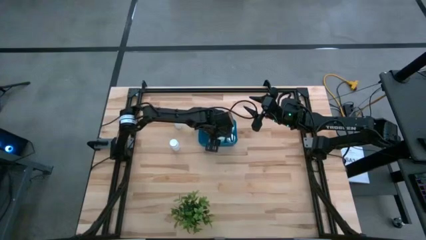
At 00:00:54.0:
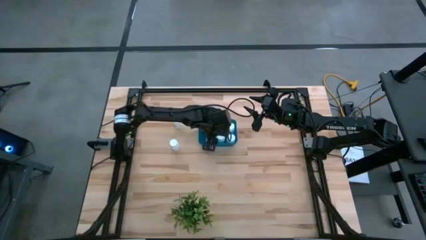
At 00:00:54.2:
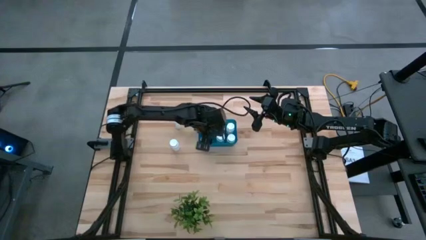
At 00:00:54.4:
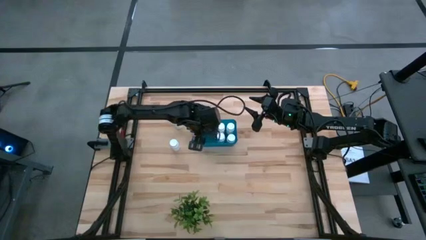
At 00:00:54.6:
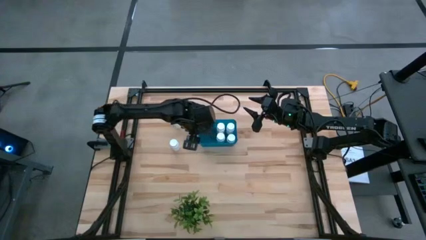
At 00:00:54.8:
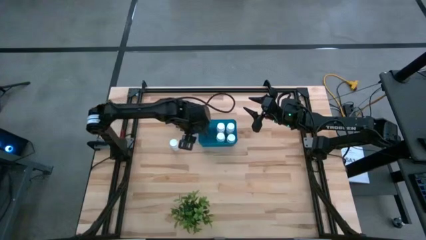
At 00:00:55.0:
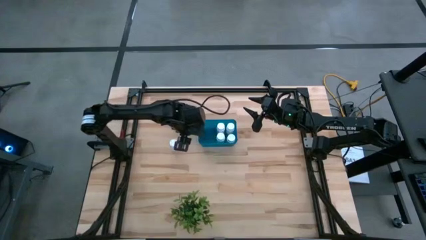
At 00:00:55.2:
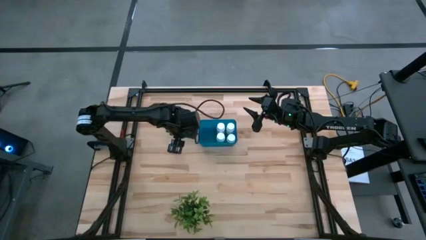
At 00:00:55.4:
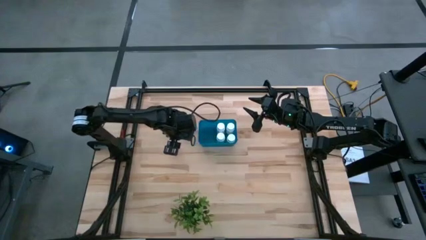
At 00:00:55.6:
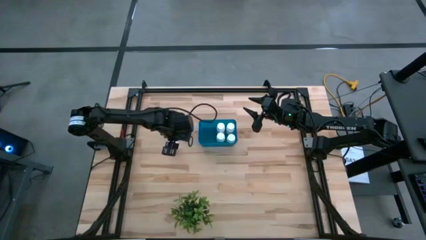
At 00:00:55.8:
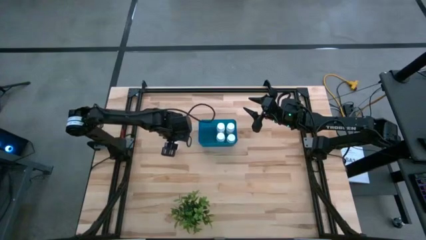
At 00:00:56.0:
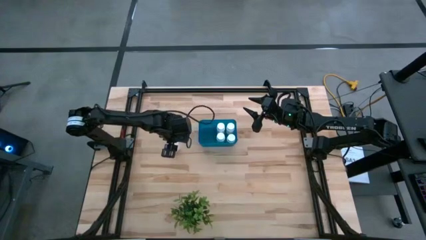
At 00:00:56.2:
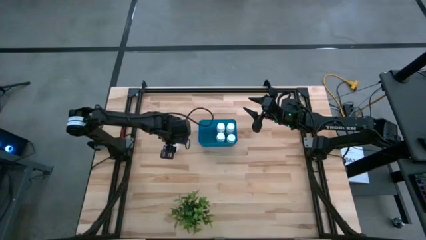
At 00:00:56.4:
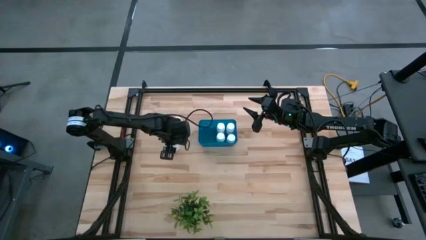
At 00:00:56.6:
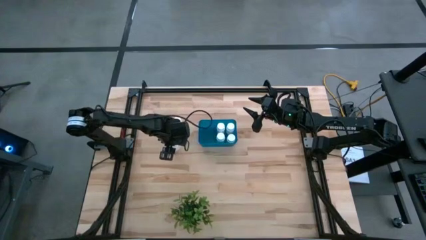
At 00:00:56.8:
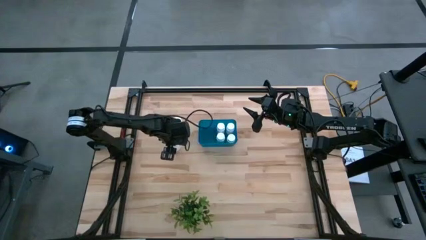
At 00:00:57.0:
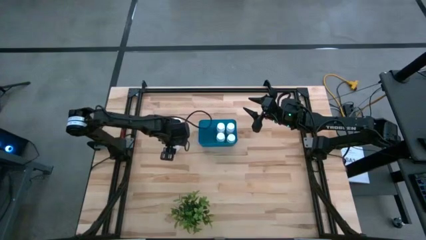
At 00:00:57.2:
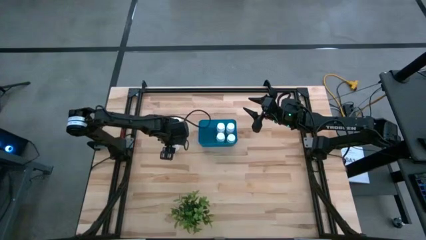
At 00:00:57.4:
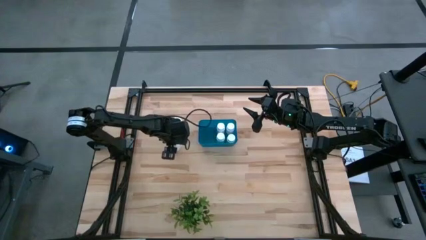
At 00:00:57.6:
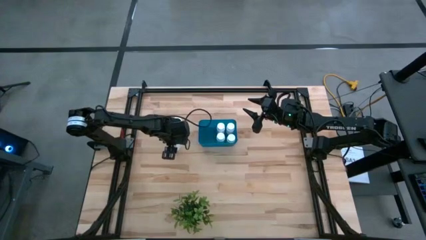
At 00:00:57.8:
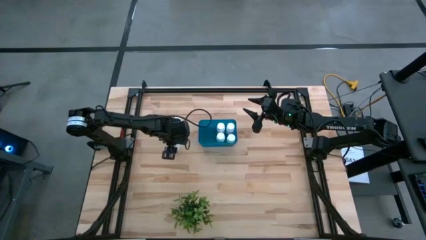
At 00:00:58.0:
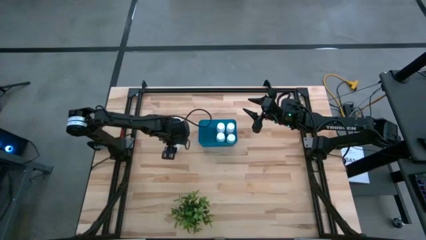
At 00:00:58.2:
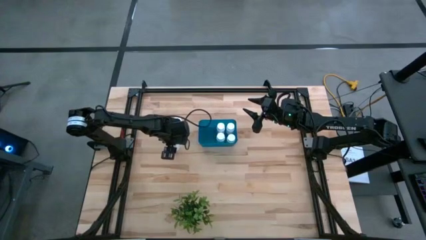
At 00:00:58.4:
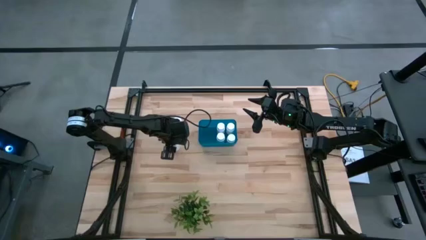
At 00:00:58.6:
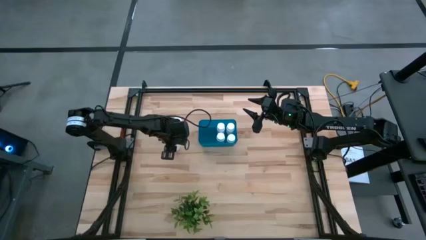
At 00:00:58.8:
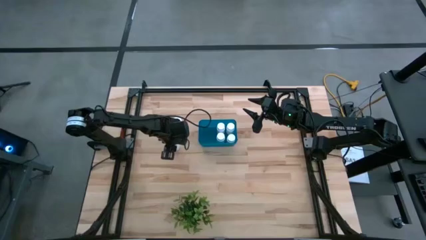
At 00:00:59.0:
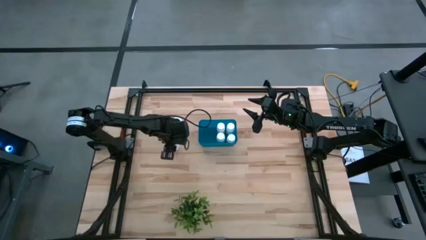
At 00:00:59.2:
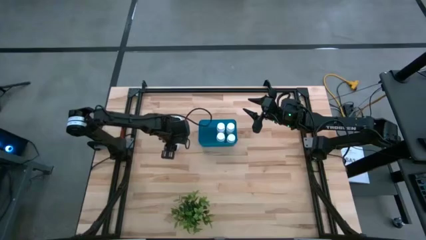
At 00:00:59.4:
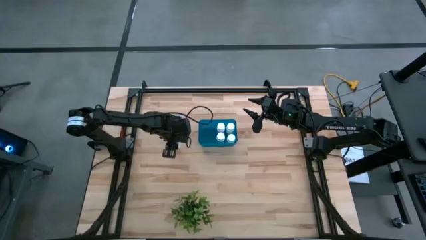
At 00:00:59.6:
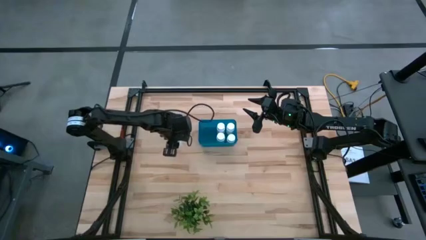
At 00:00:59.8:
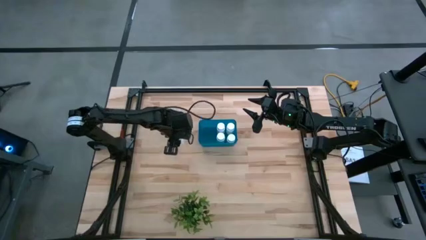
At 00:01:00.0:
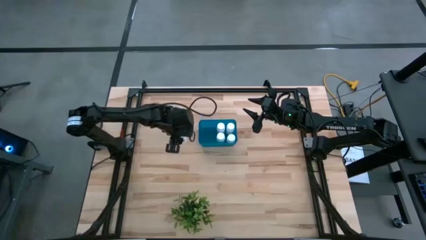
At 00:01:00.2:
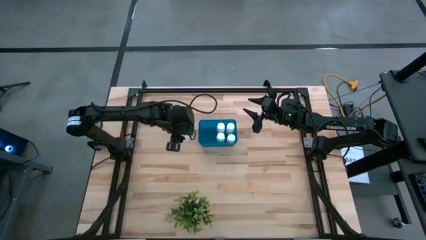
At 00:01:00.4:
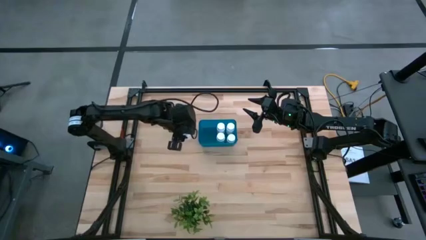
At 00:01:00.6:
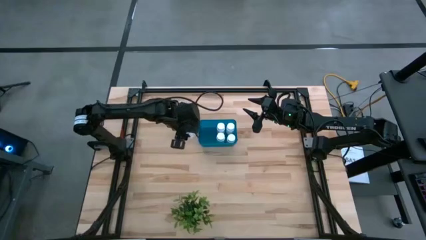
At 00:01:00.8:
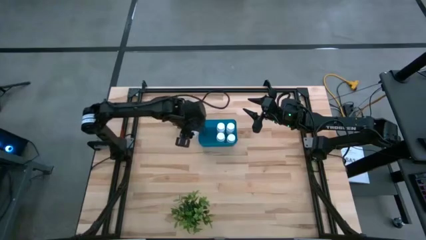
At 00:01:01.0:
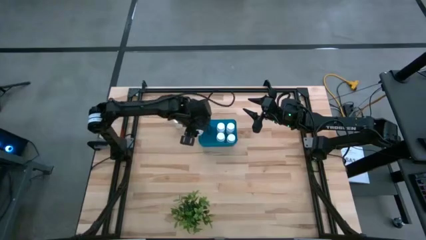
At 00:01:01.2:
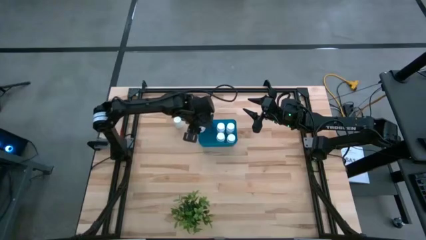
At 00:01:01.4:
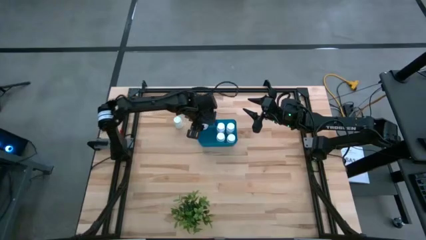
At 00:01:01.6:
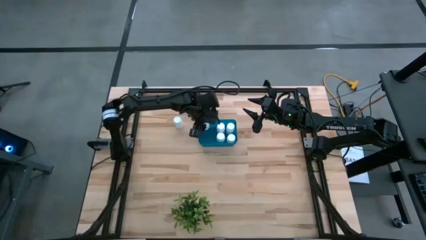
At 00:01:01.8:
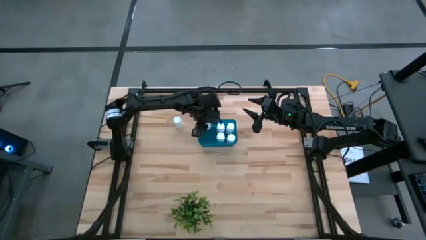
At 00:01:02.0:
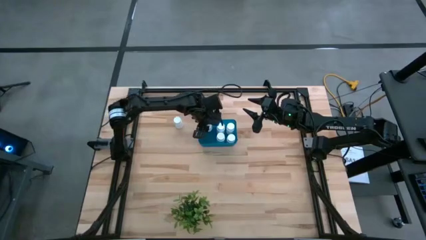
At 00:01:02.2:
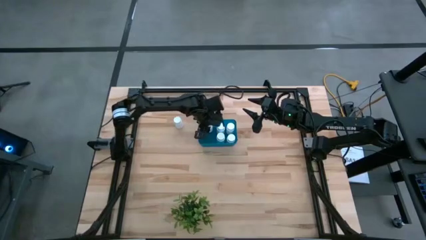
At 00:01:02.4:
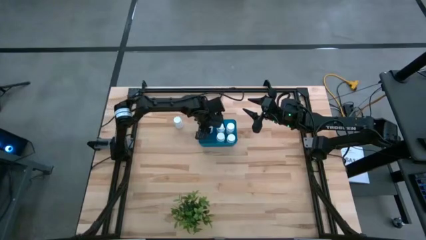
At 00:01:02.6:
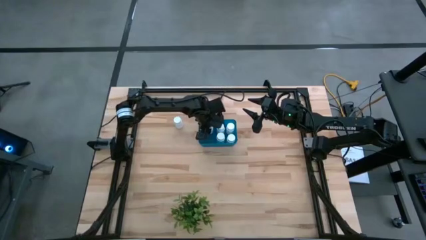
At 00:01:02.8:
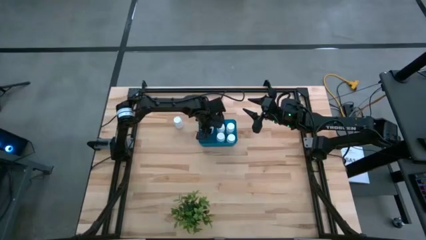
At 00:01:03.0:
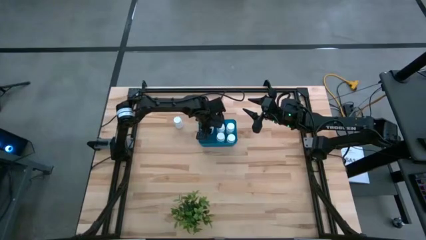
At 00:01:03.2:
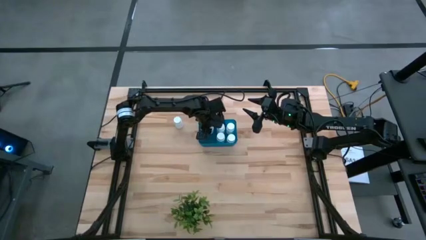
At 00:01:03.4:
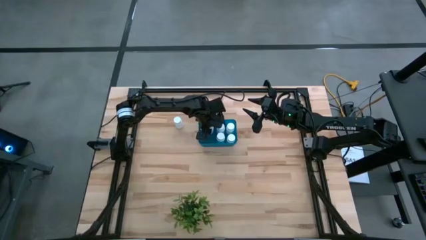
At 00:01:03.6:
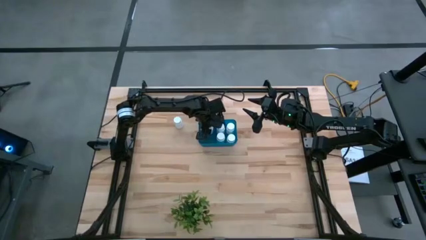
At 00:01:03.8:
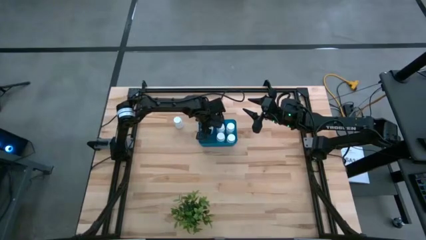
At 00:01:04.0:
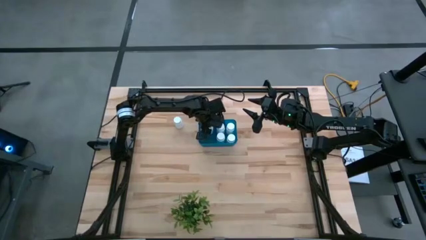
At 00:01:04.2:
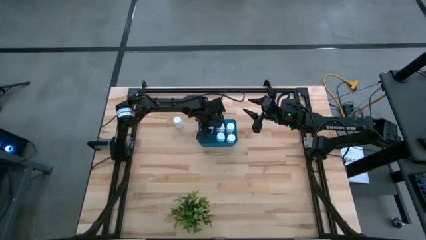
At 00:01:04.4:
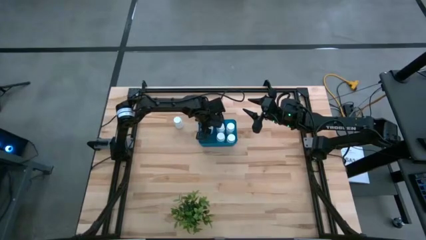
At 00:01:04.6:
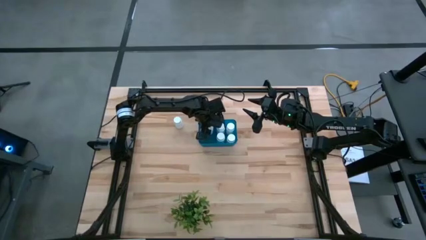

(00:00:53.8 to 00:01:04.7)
Task: Pick and place pill bottles into a basket
Put the white medicine bottle into the blue bin
